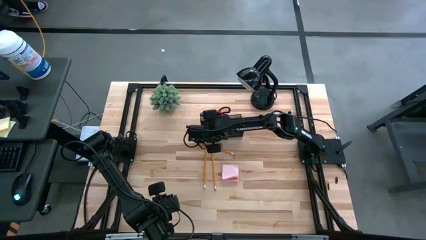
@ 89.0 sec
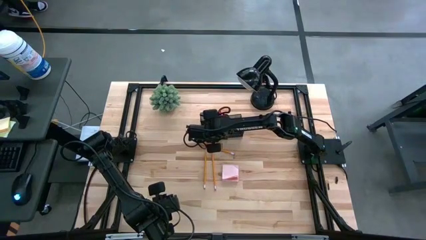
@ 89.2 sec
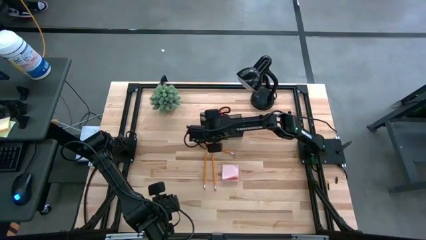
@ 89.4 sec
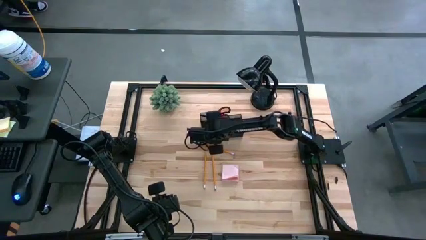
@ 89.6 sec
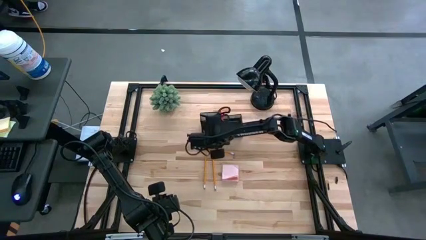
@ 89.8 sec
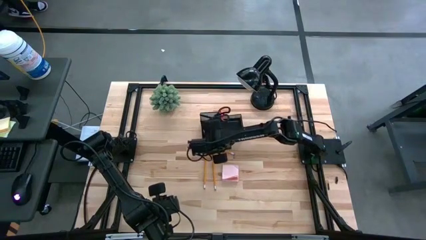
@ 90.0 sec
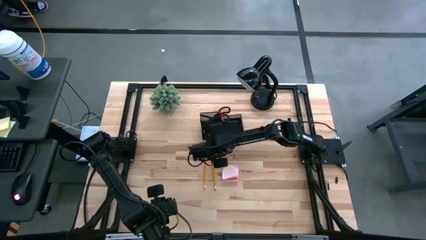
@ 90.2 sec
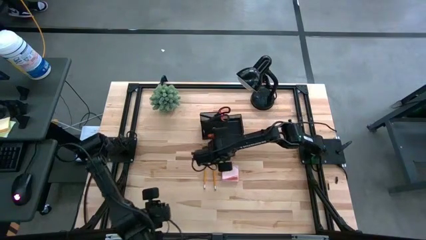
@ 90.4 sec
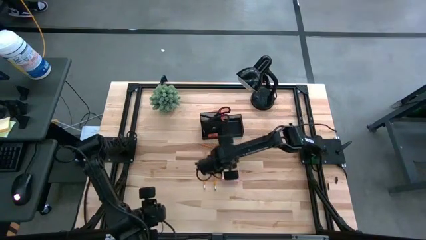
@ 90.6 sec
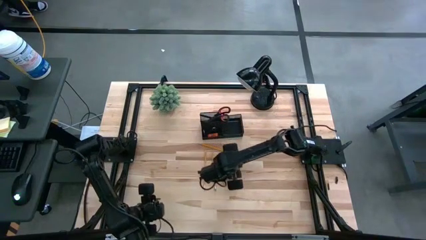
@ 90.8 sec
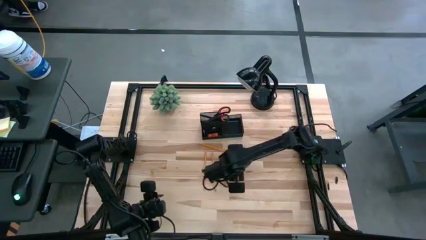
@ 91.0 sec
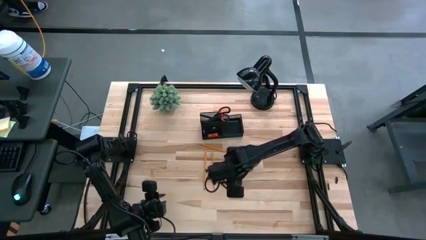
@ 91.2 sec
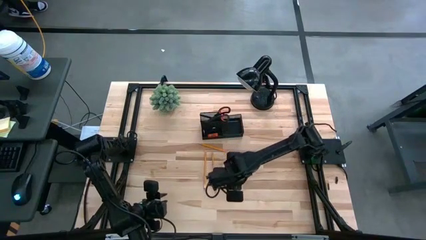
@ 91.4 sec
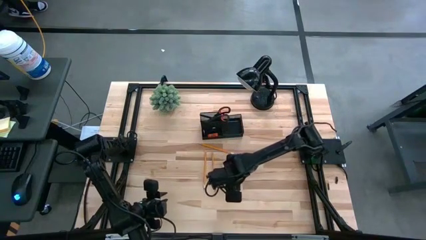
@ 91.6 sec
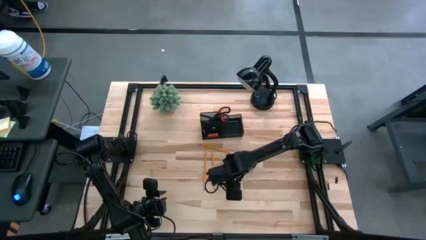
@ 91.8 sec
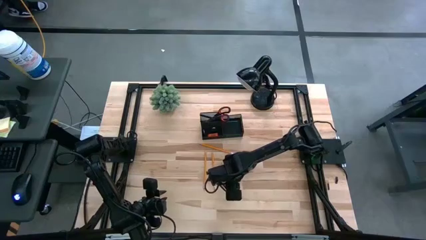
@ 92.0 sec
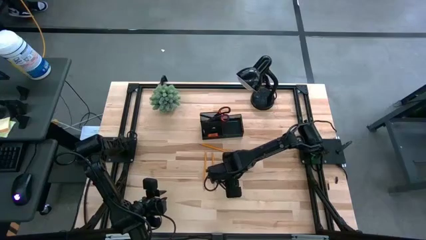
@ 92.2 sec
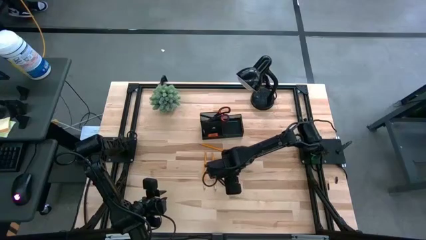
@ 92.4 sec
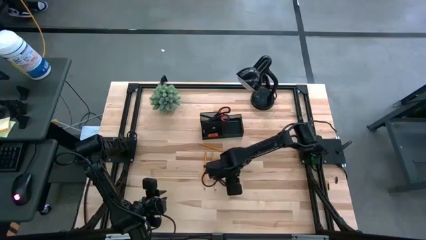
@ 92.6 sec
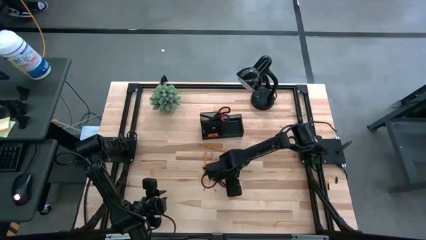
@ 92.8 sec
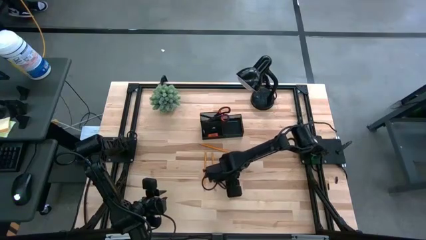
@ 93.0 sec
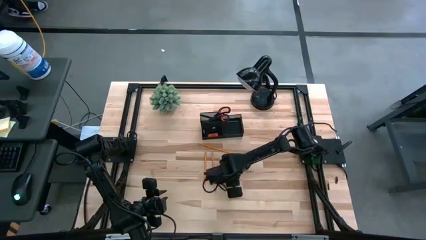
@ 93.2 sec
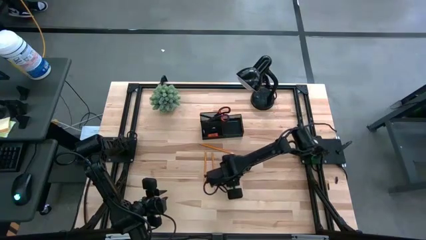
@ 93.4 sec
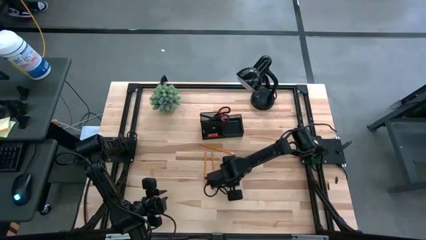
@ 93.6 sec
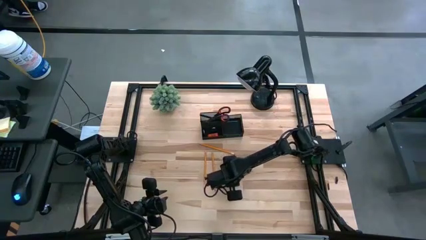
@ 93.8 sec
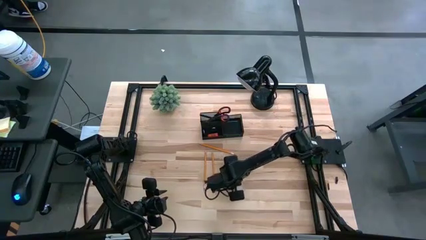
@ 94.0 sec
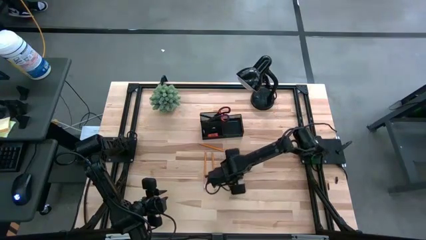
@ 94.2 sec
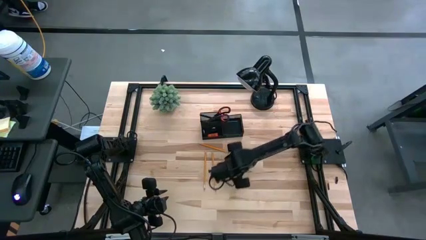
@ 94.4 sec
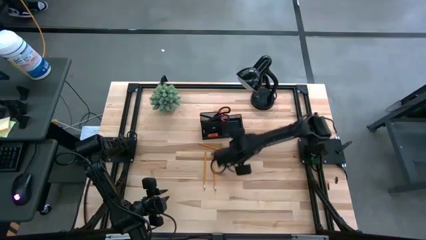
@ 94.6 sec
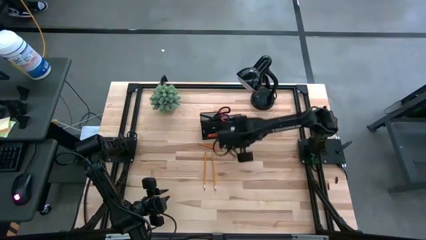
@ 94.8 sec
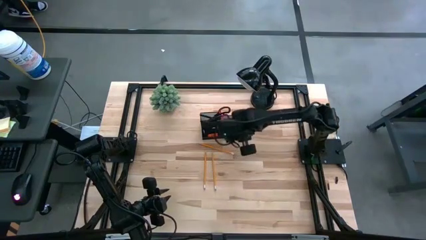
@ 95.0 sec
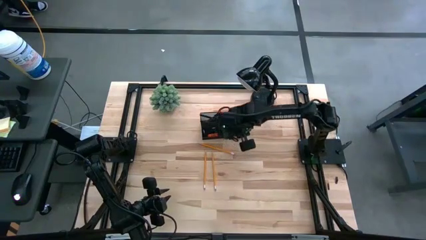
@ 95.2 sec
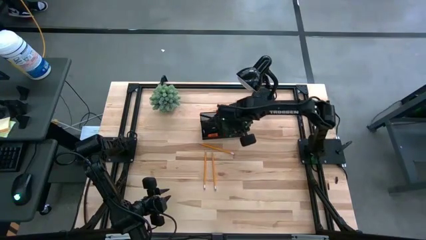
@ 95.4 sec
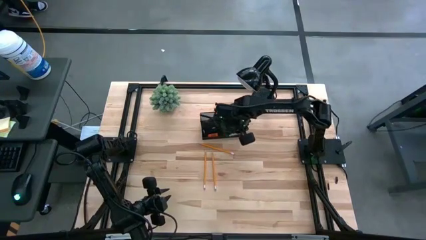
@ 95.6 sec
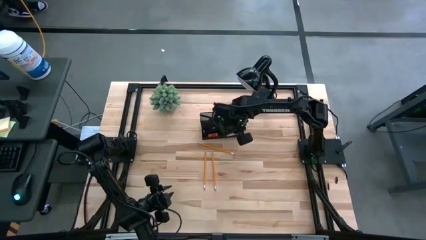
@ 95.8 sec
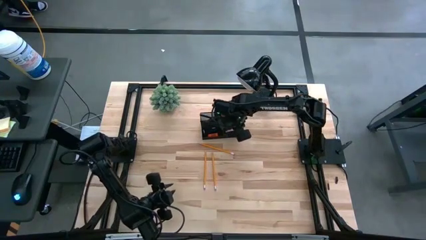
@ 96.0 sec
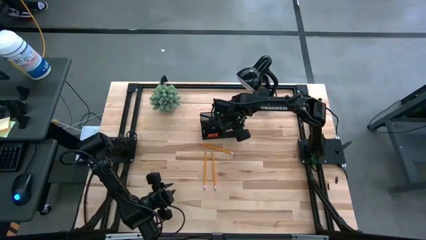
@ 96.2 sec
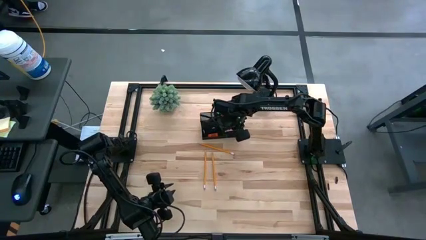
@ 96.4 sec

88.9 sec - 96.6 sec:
Task: Pick and place office supplies into organizer
Put the sticky notes into the desk organizer

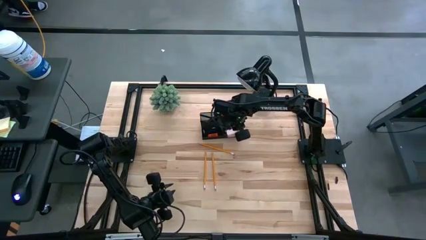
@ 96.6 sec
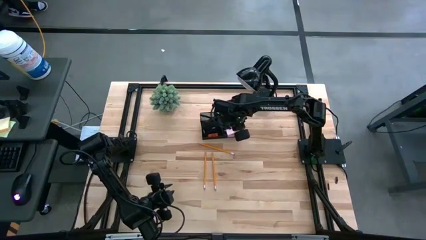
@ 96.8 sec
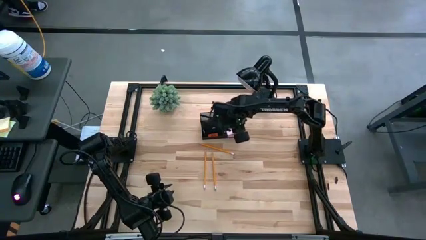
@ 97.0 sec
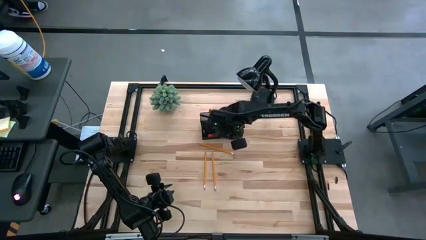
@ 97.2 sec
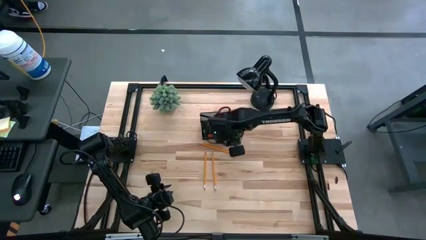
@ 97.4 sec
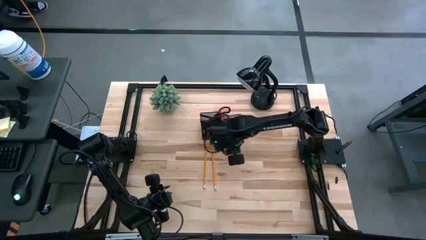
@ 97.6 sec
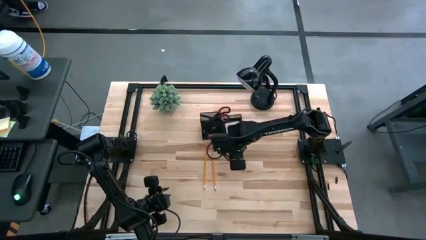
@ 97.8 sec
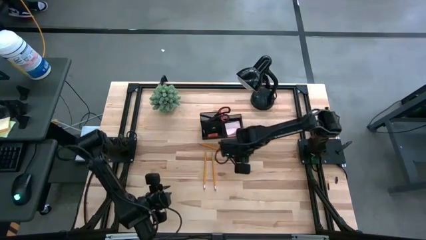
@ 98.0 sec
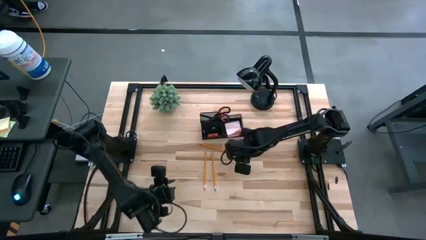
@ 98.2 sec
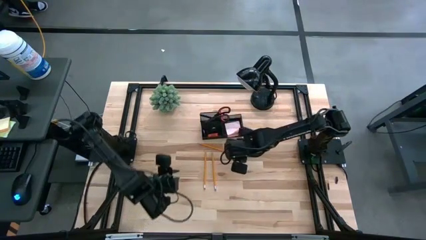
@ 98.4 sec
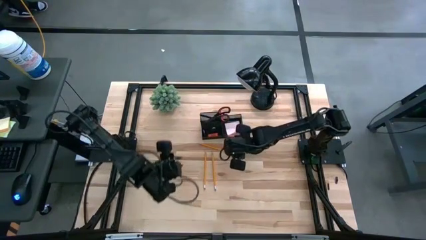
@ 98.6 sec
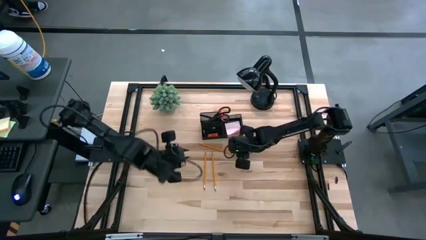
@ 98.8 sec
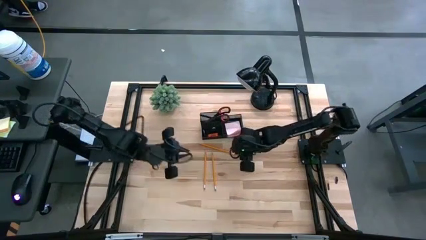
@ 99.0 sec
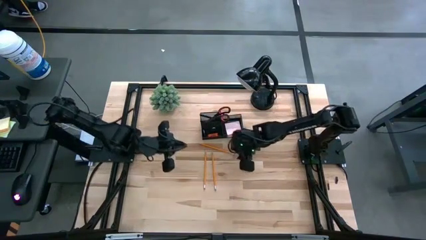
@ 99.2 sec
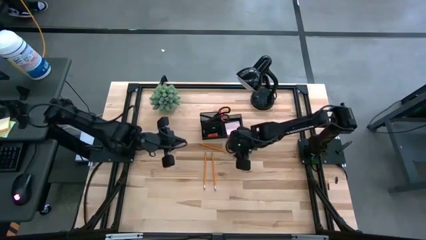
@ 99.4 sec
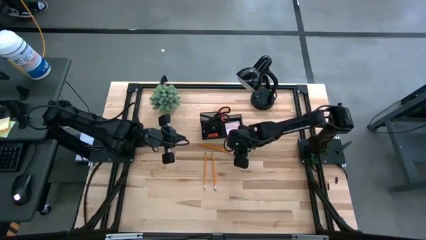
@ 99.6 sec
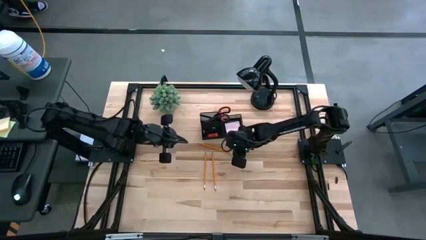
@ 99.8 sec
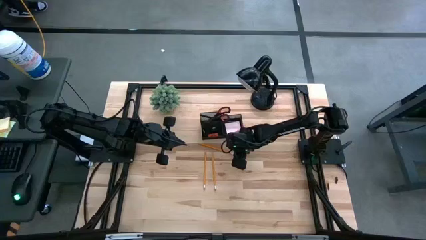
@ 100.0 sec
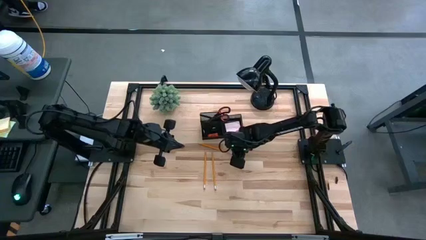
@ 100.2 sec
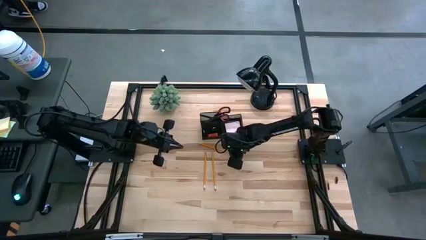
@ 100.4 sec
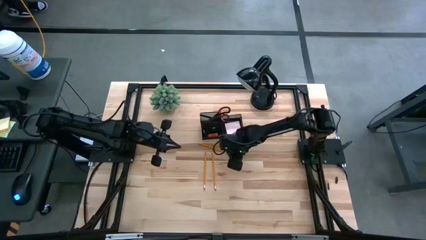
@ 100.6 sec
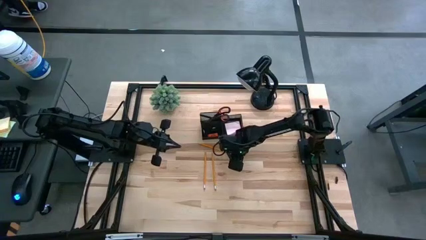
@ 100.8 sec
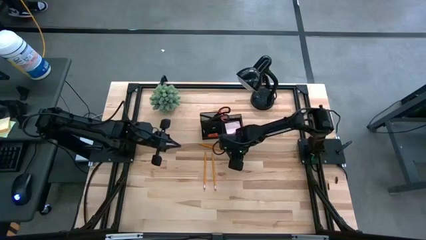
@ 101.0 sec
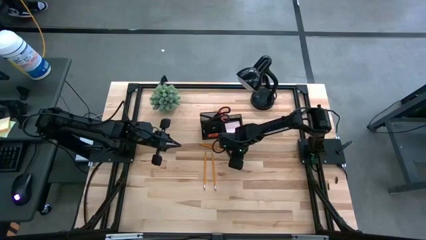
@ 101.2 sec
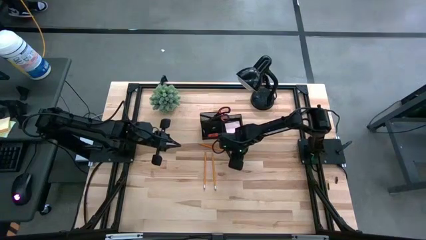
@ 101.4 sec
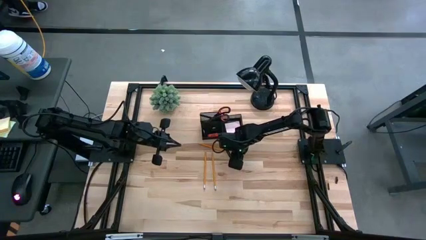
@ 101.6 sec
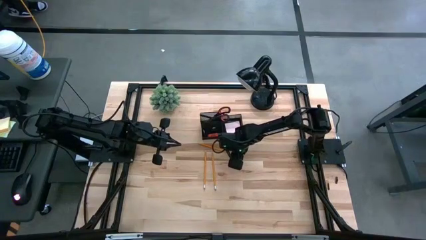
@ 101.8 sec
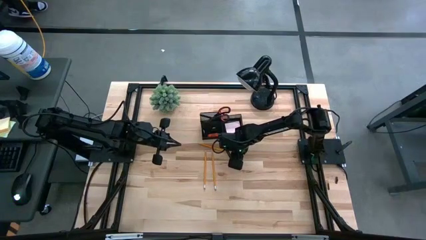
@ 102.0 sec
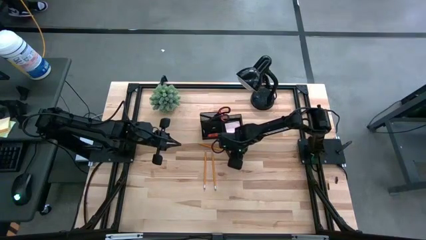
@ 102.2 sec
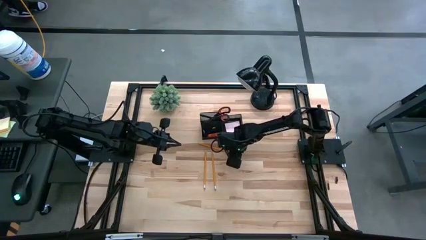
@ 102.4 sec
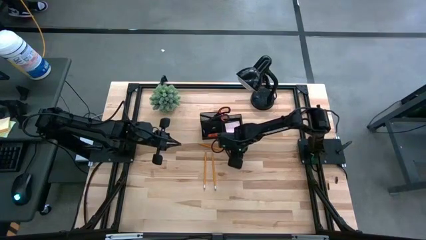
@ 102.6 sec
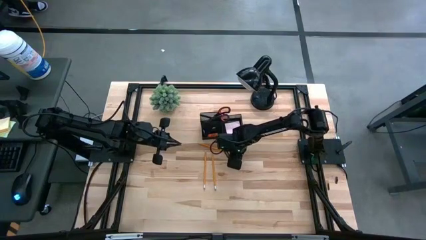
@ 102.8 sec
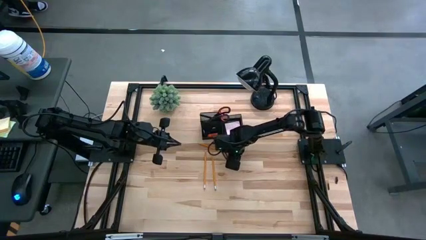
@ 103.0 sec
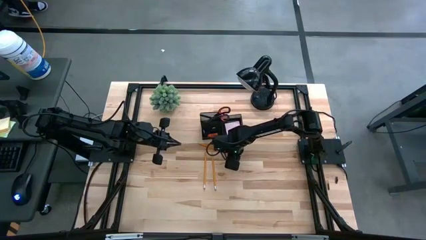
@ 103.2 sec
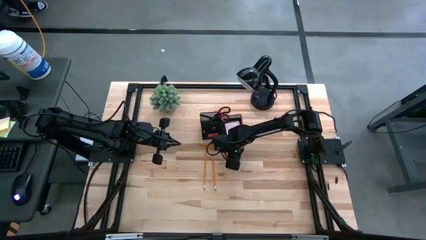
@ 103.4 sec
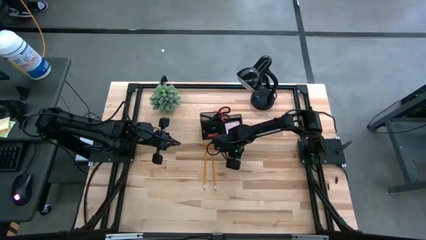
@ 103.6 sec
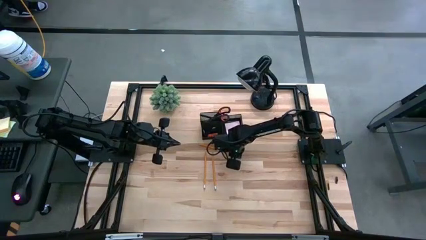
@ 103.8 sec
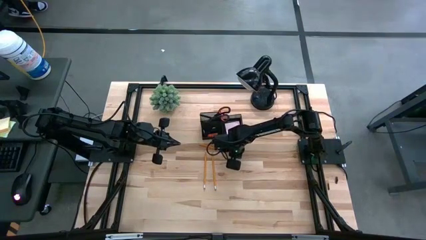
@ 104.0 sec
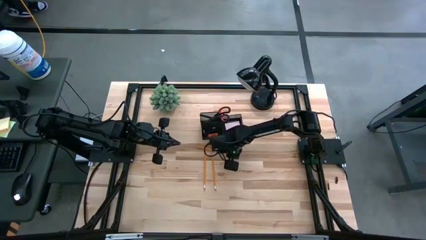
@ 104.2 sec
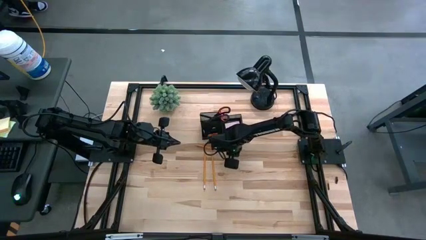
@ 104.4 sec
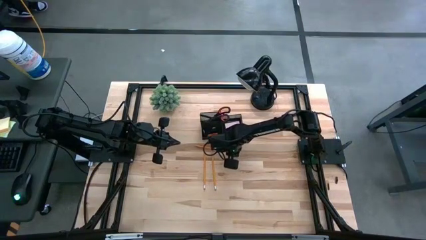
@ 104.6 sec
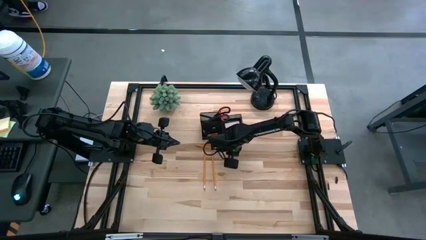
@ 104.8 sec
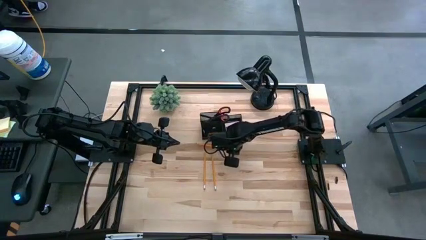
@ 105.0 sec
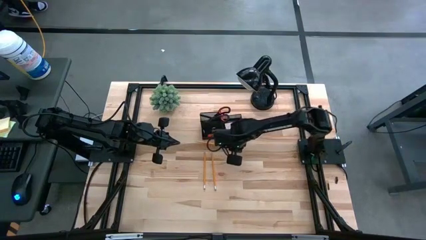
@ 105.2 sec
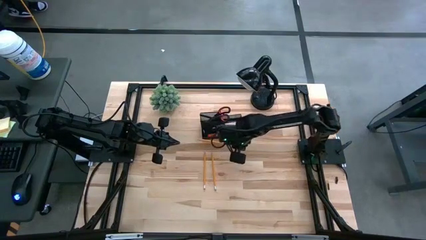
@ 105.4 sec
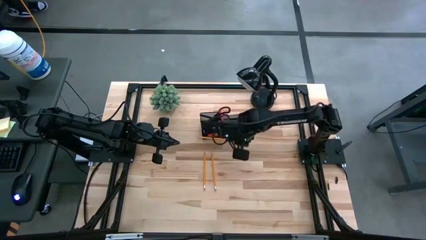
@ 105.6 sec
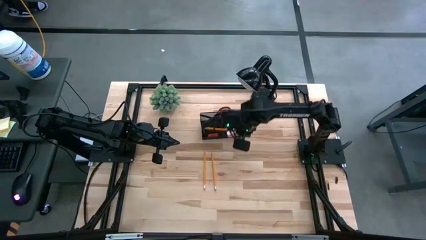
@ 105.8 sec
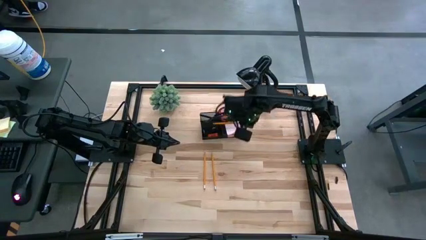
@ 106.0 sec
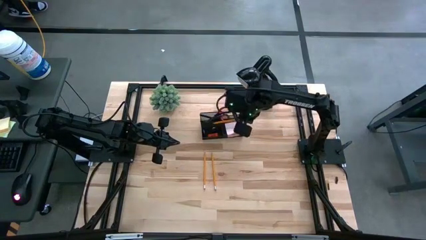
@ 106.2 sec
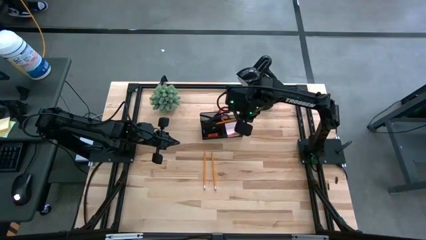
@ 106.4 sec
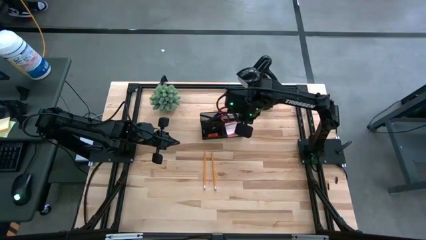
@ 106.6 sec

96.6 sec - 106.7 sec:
Put the top pencil into the desk organizer
